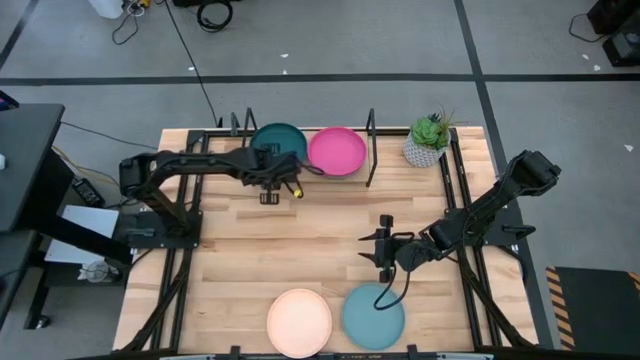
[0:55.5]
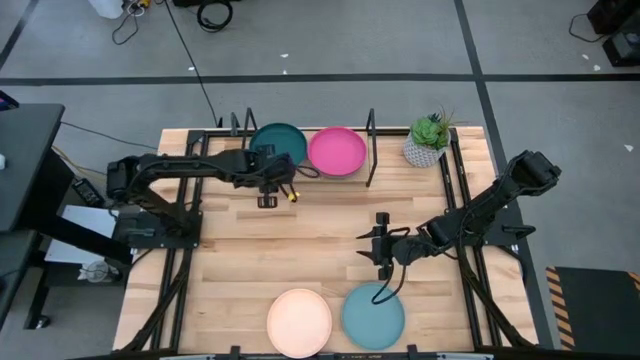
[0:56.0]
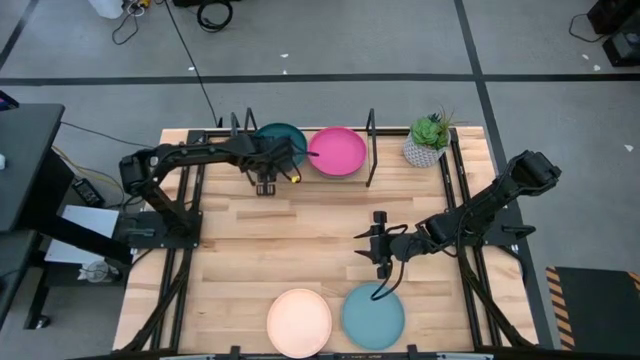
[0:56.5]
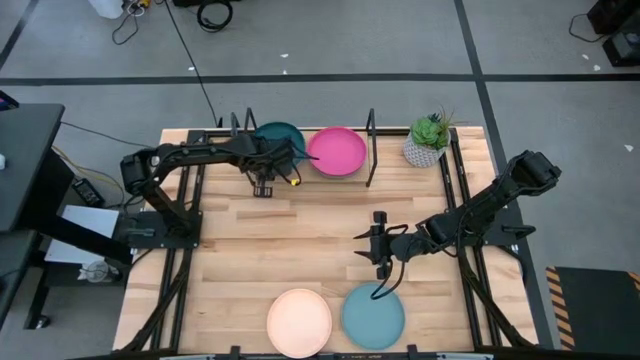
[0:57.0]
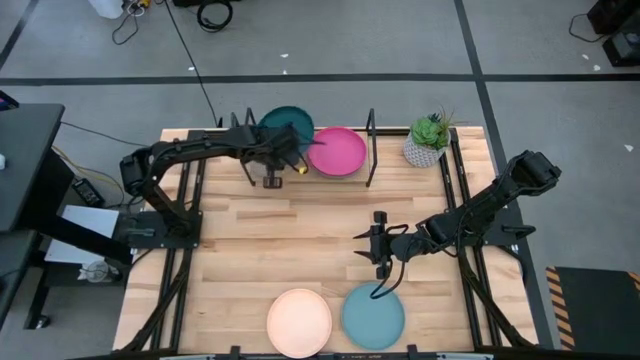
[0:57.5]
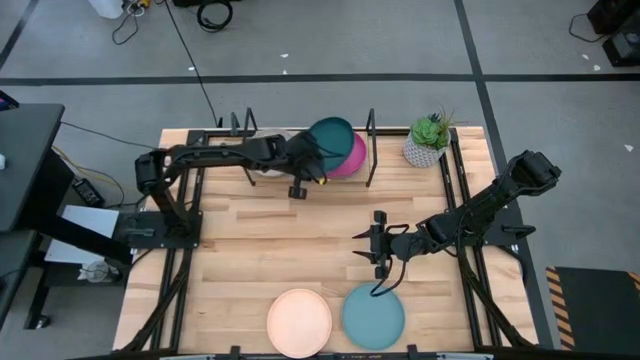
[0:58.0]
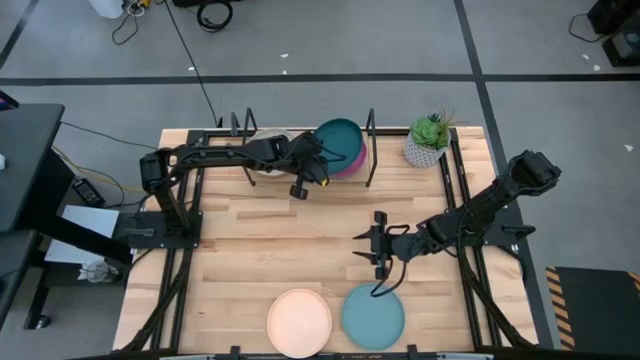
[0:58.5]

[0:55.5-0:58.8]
Task: Place and stack plates onto a shelf
Stack the dark green plate on top of the pink plate on the shelf

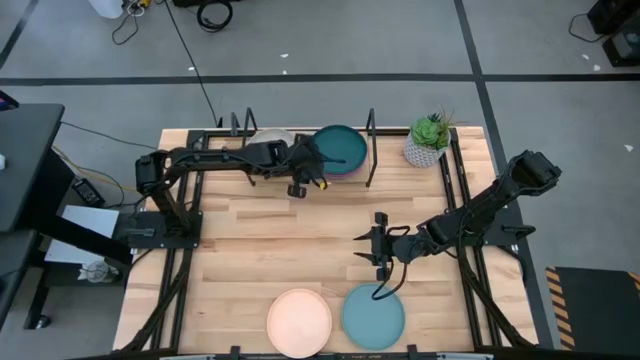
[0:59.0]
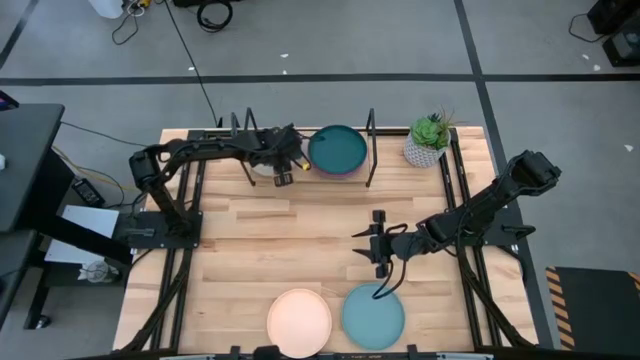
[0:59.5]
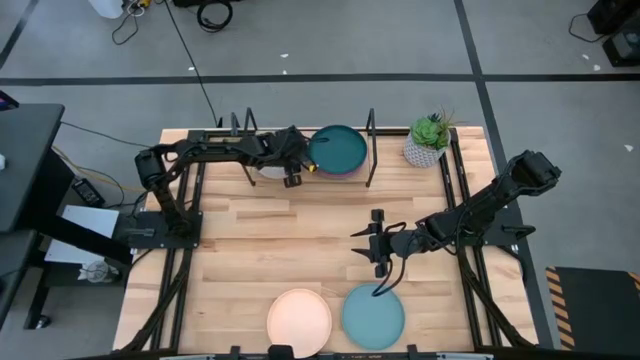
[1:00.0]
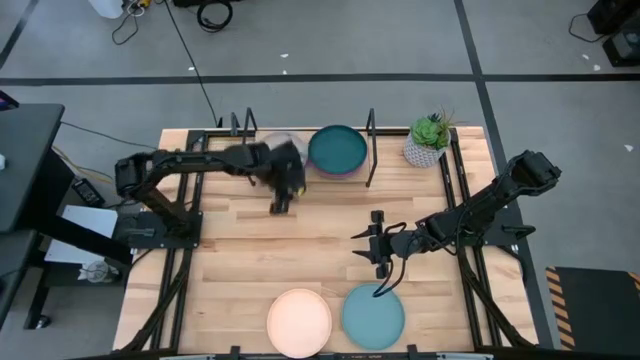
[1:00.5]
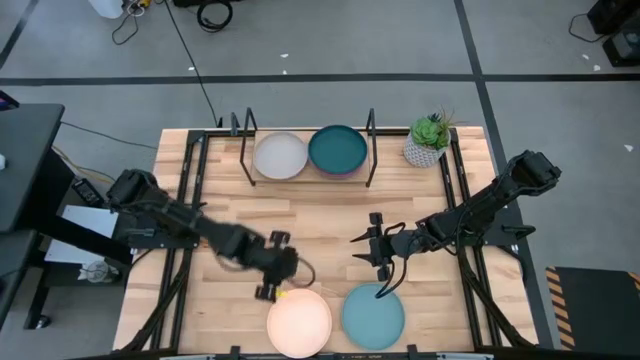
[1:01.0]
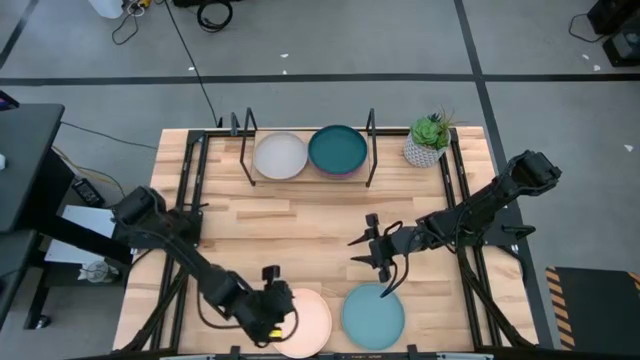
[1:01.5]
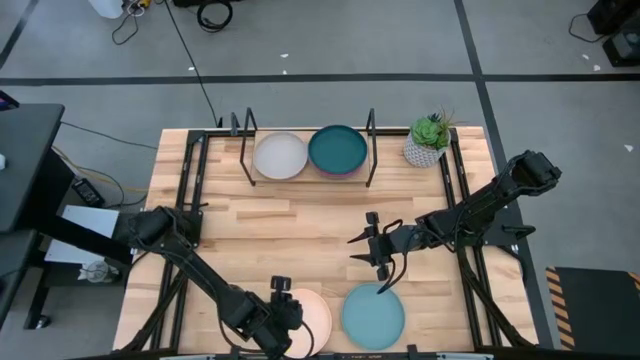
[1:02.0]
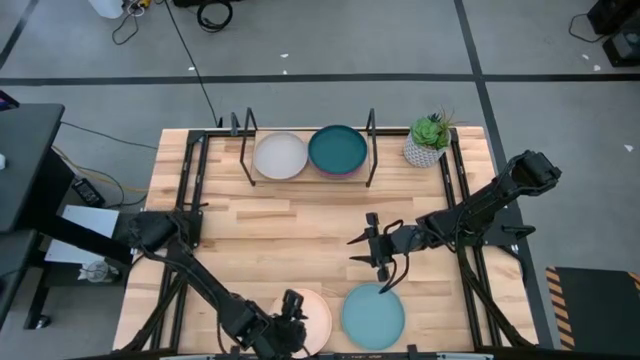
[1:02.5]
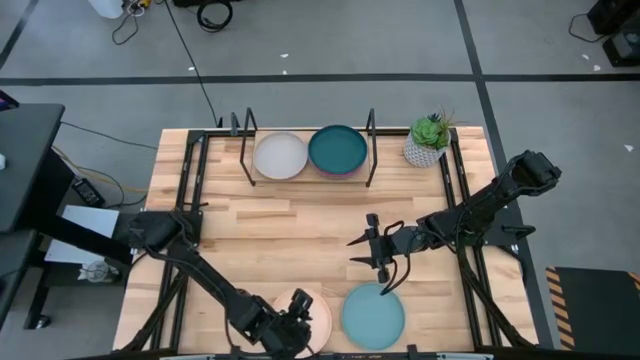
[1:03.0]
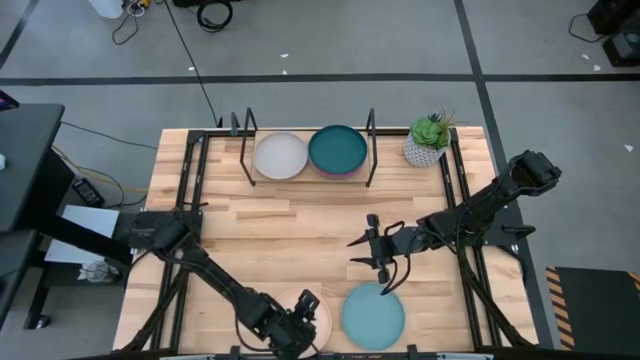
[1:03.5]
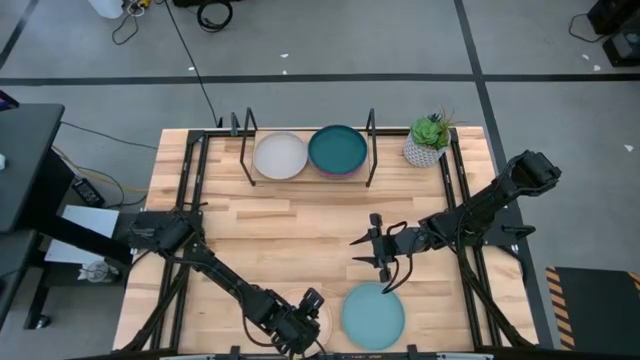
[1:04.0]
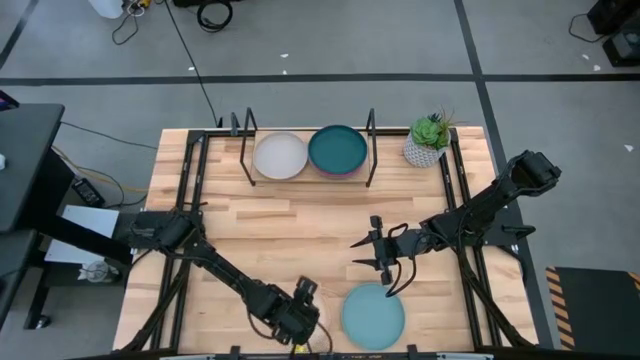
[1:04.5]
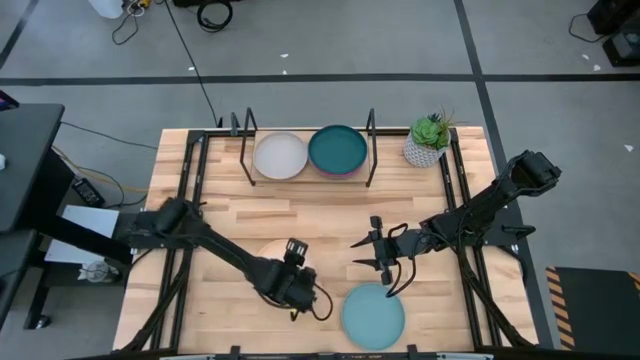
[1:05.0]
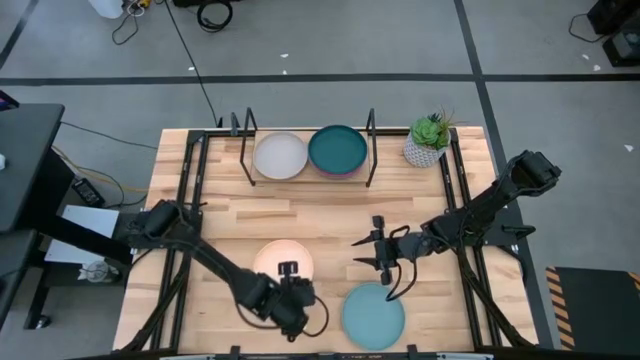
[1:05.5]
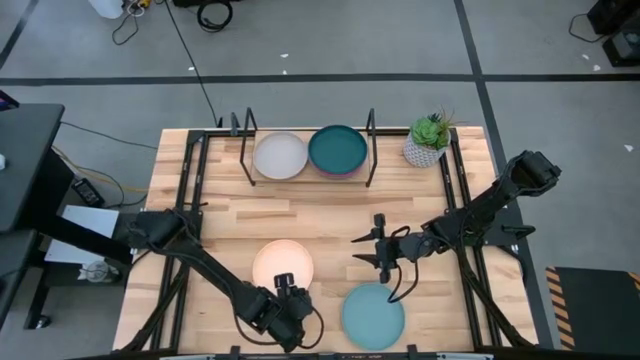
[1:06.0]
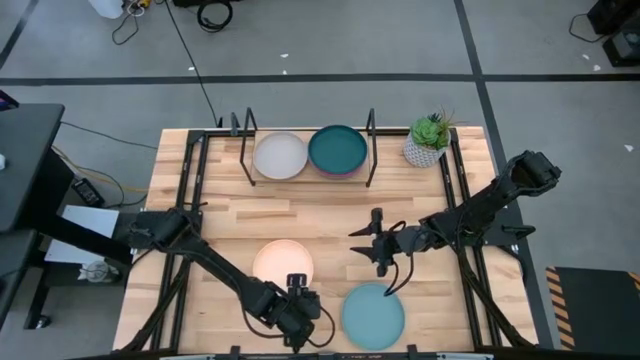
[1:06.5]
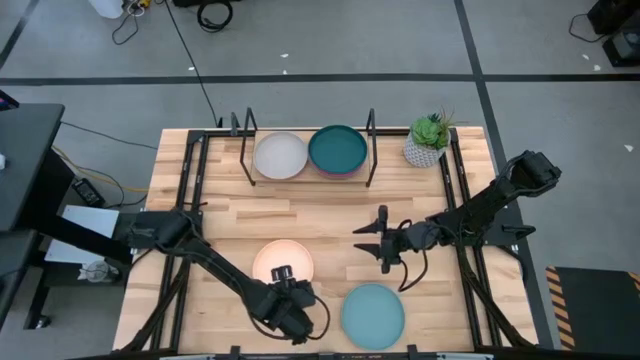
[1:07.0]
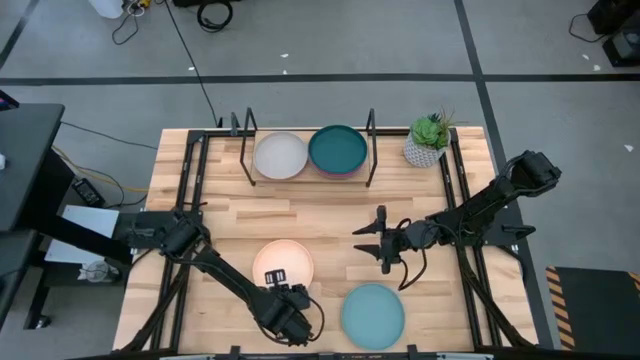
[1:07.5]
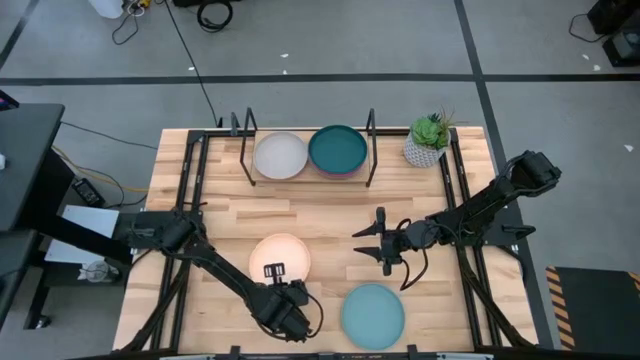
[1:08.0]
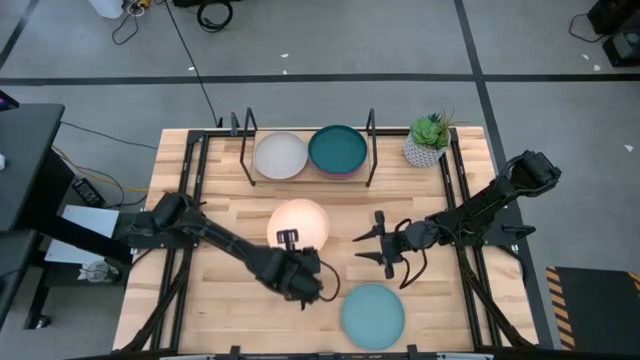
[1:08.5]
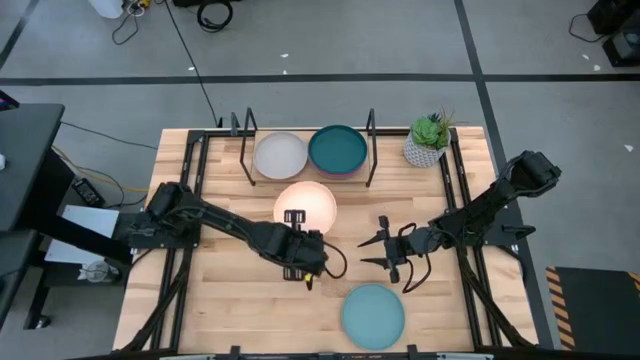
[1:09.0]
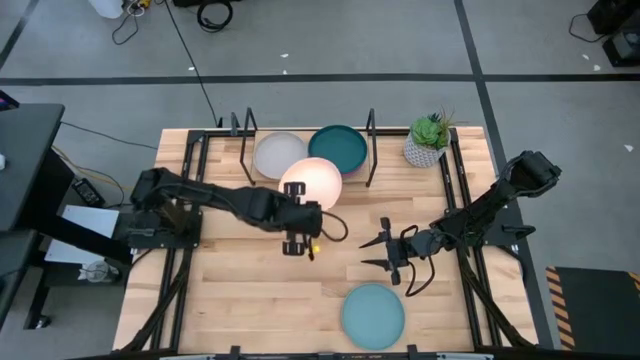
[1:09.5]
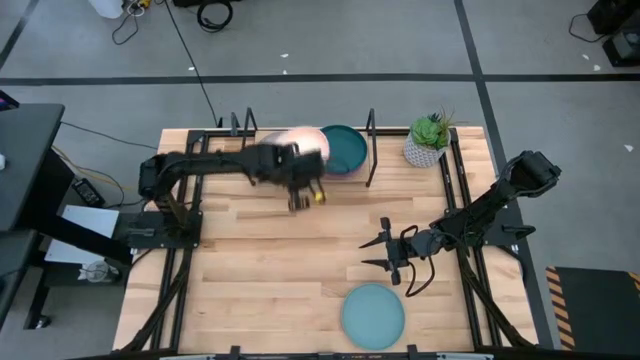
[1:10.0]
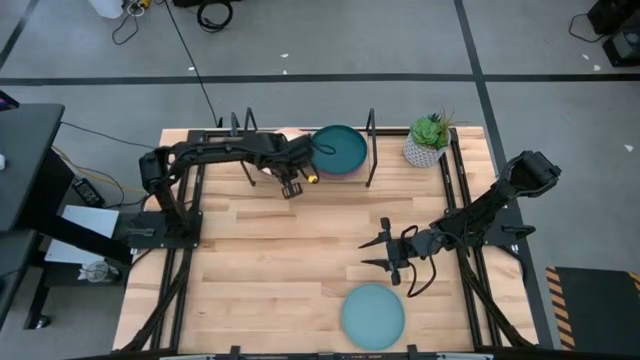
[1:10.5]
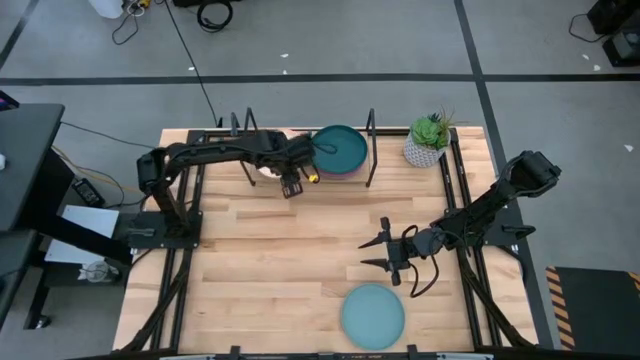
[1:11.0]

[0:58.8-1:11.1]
Stack the white plate on top of the gray plate on the shelf

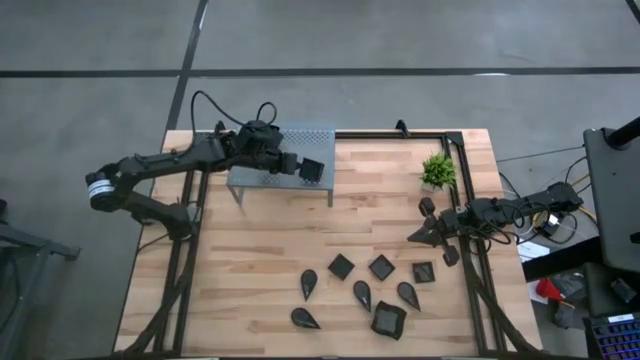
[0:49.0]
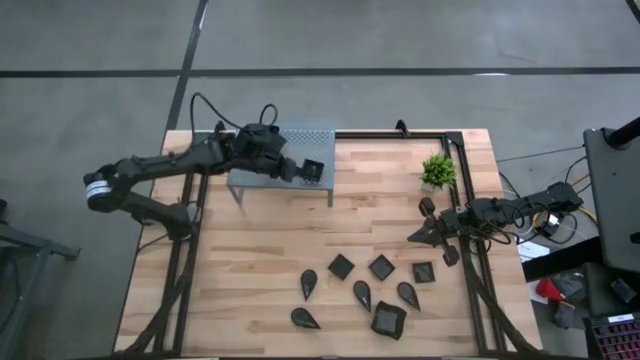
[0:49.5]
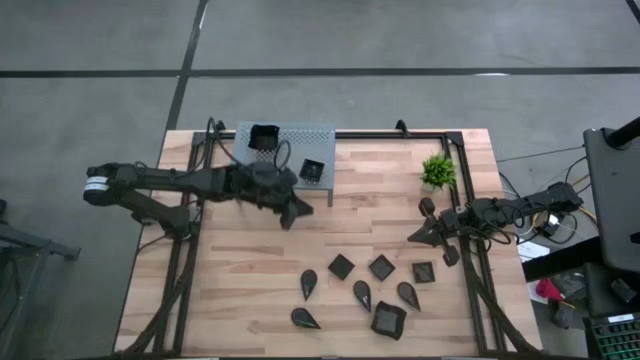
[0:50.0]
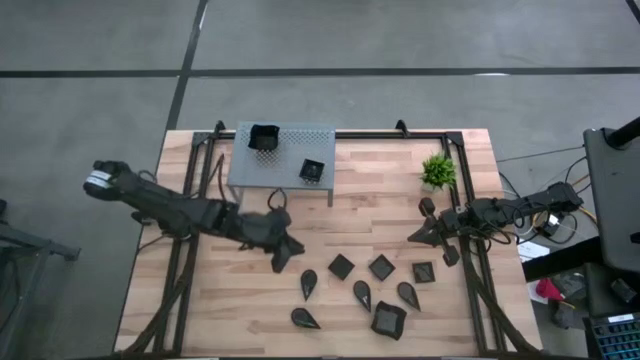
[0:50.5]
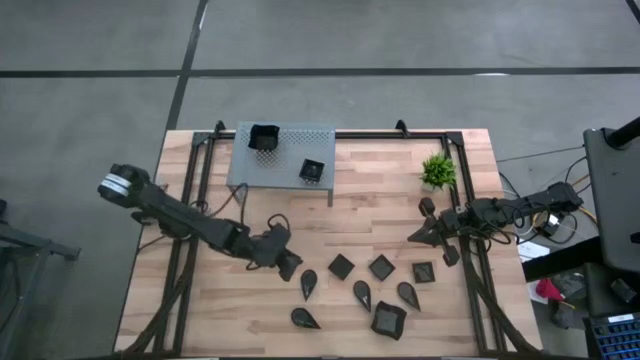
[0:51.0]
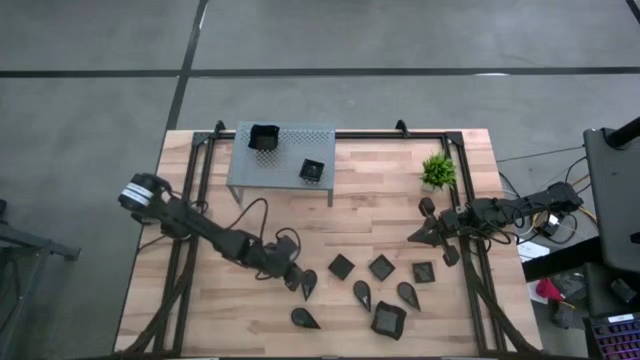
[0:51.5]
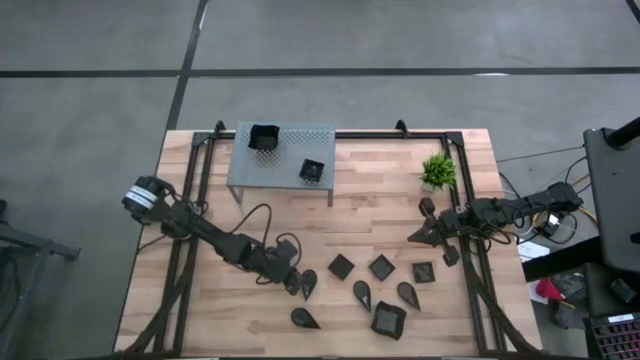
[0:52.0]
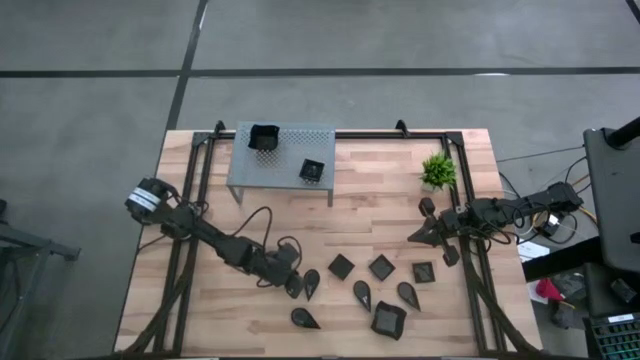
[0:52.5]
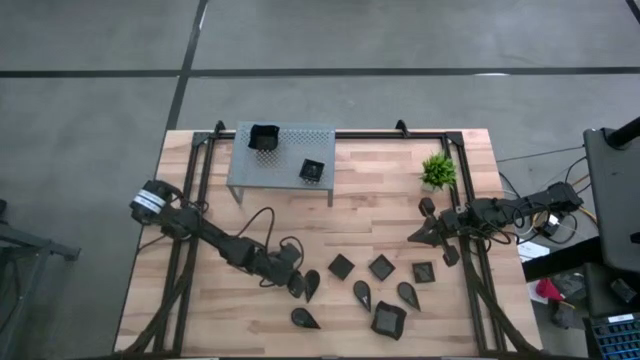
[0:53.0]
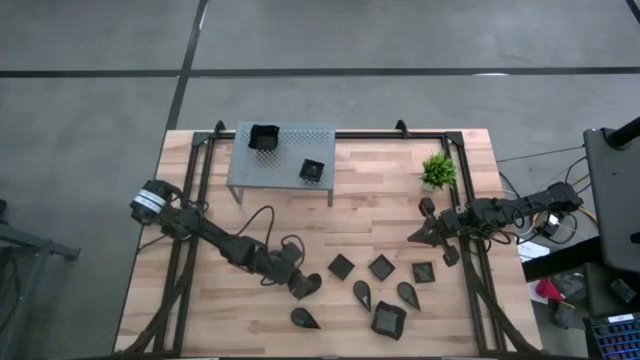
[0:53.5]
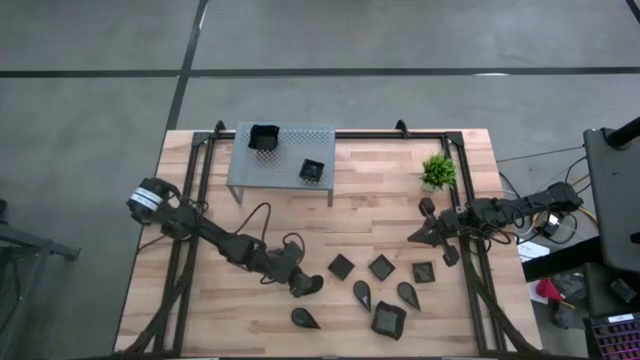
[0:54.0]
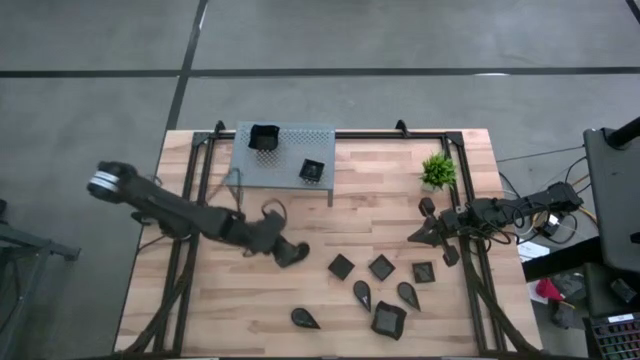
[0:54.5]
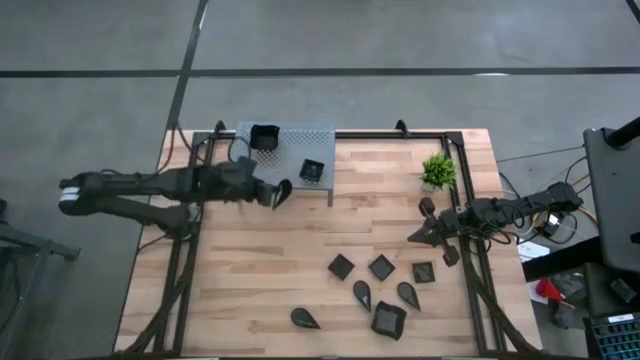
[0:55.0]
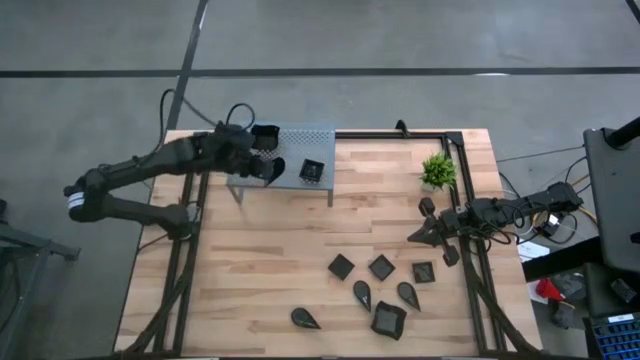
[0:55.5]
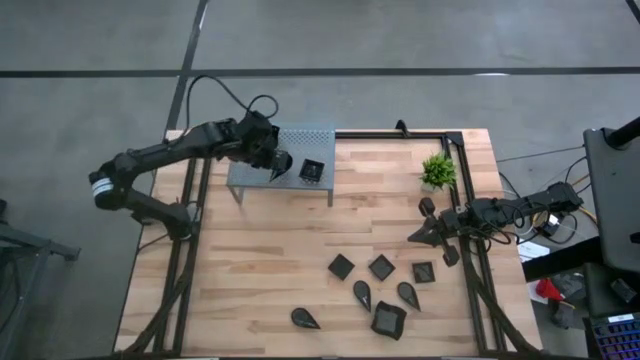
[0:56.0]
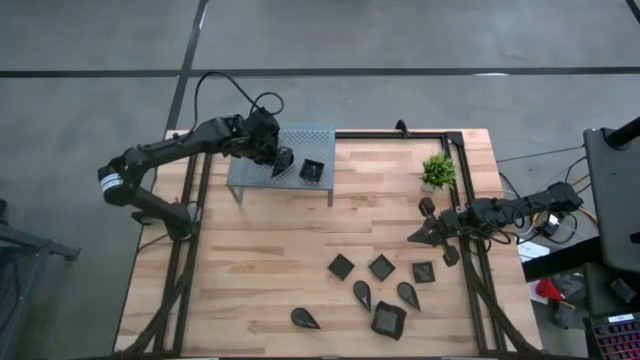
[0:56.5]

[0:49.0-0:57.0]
Task: Pick & Place Mini shaped plates
Put the black leaf-shaped plate on the shelf
